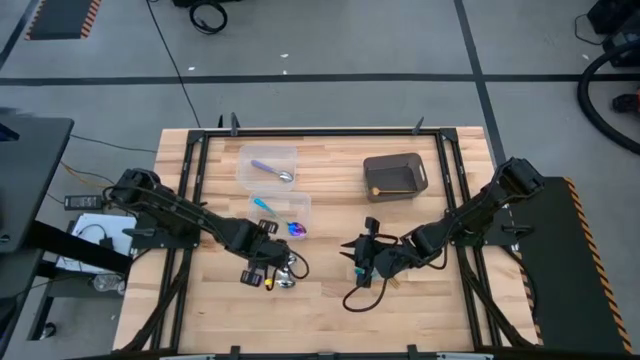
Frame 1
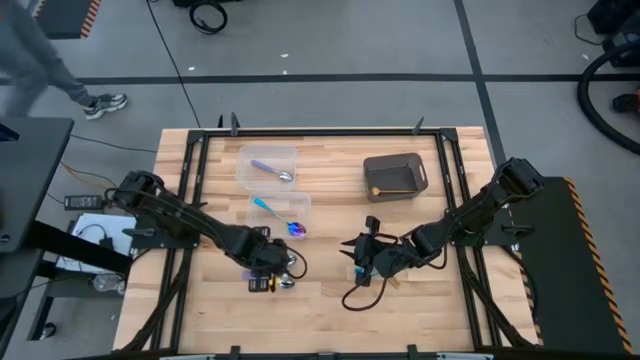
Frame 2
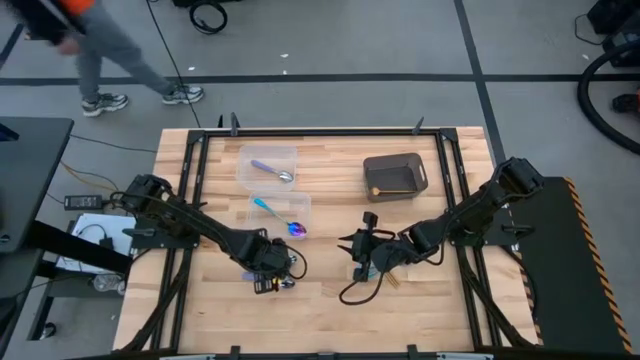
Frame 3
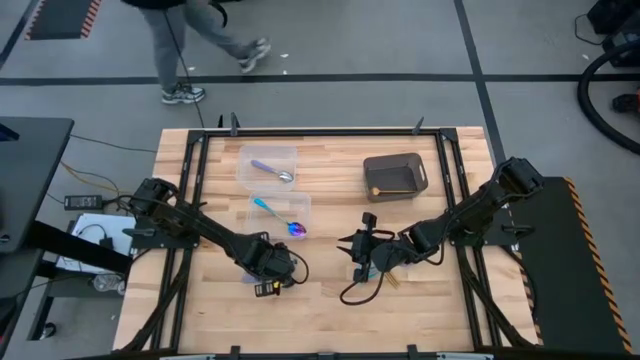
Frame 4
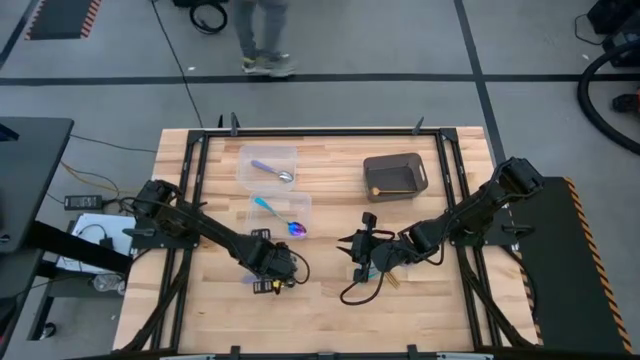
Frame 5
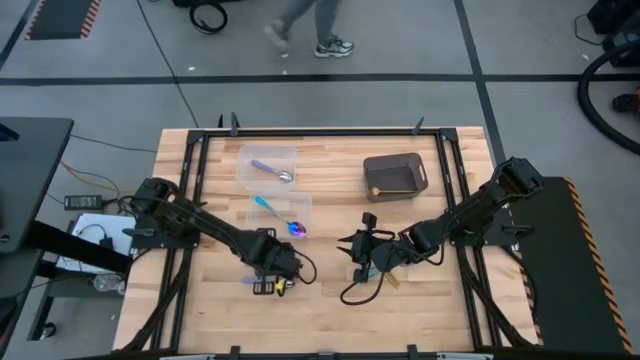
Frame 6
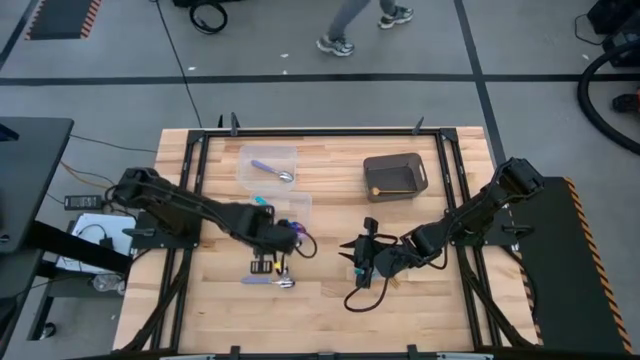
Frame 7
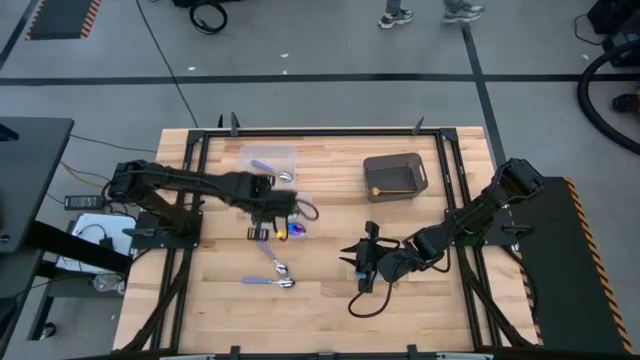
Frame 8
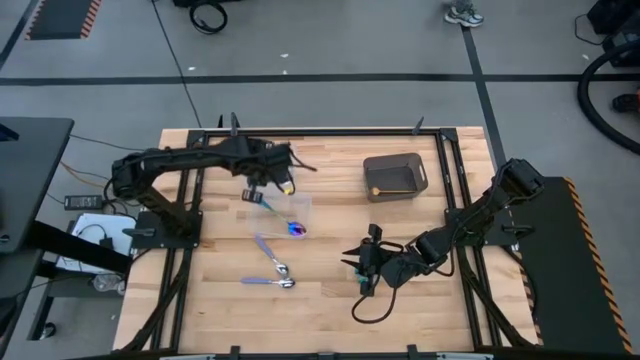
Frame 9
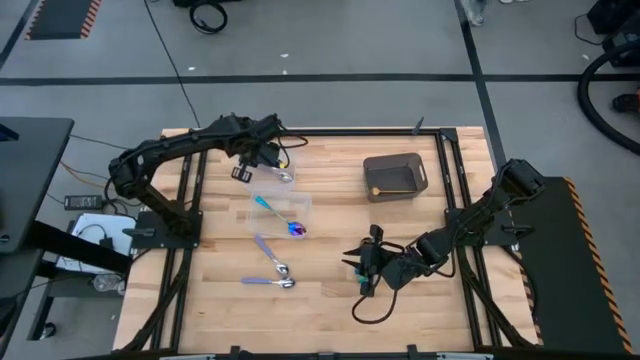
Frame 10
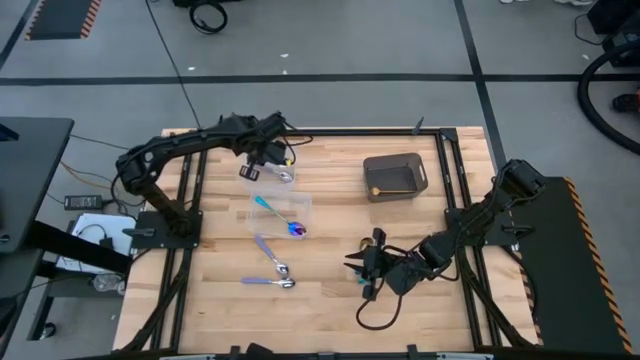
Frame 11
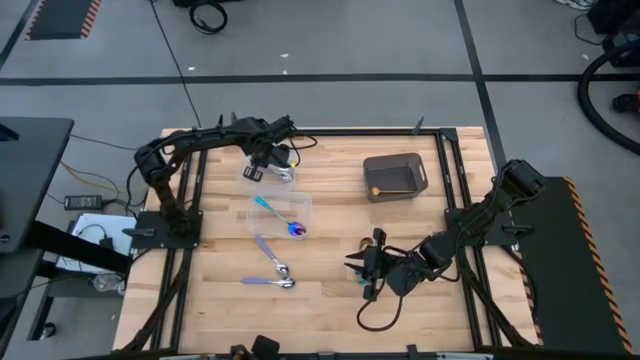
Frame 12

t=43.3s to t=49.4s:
Task: Sort silverware by color (type)
Put the purple spoon into the top transparent bin

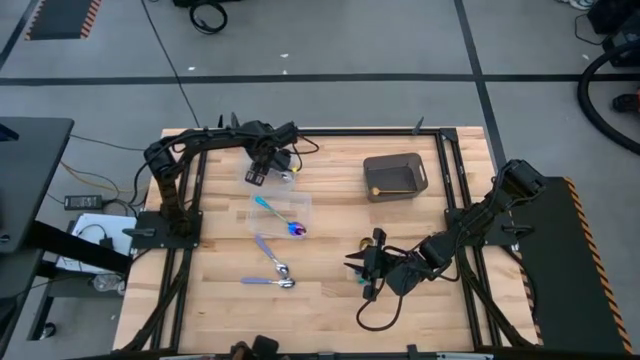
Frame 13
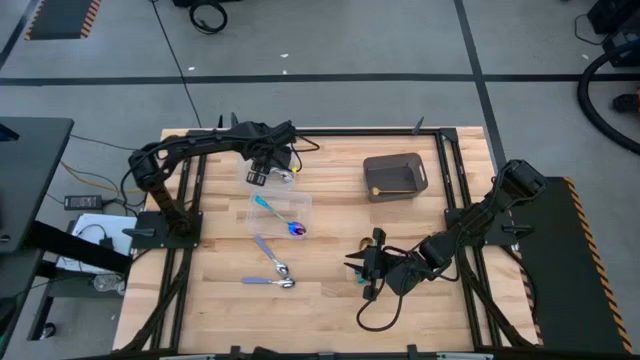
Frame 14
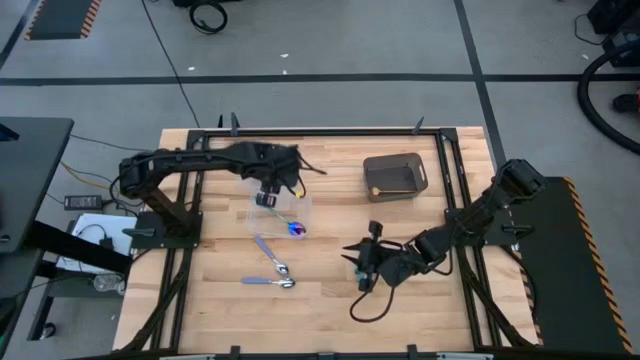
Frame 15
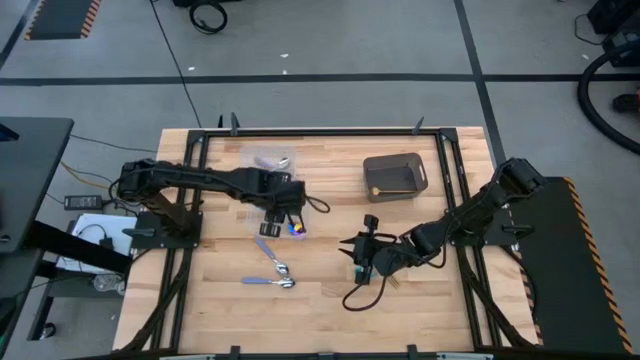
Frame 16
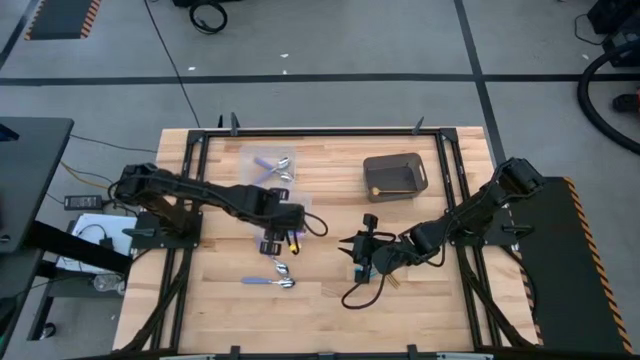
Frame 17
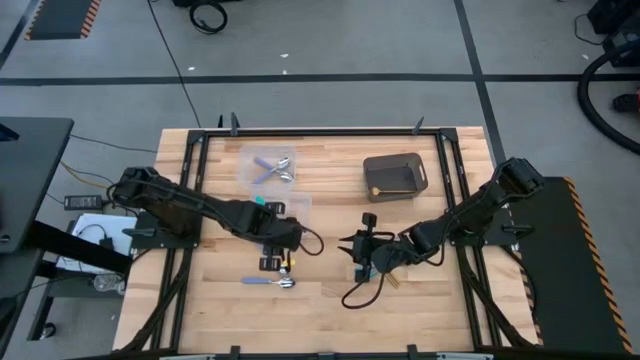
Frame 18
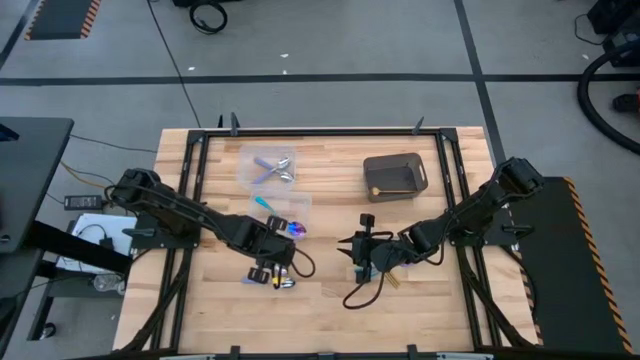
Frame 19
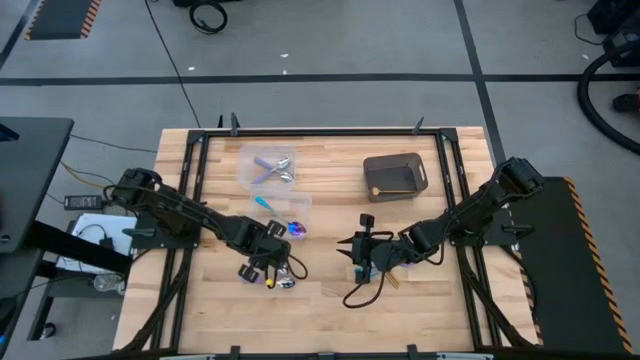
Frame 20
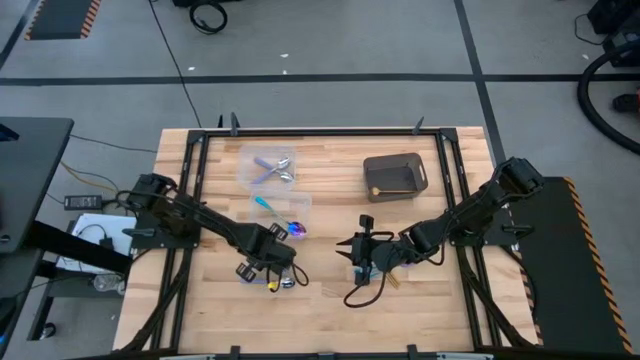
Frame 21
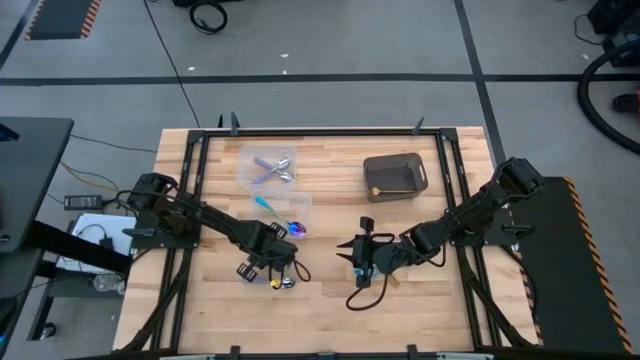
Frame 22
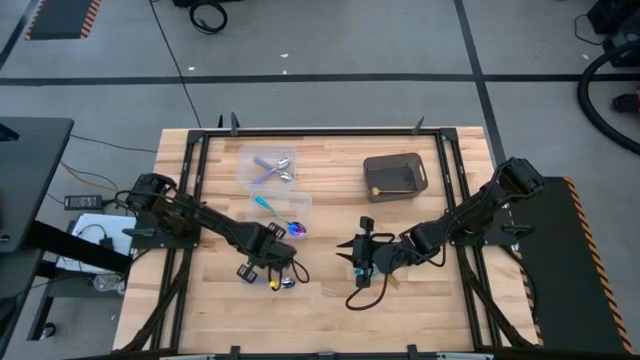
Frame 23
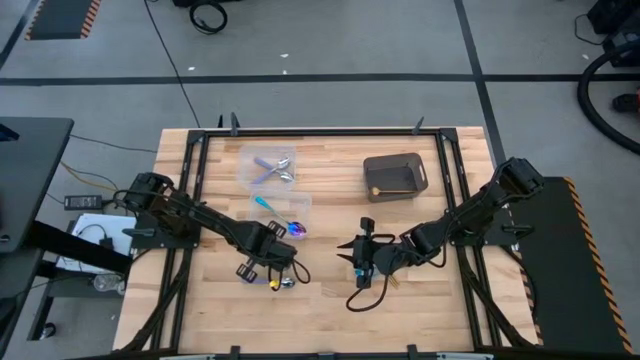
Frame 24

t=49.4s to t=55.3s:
Put the purple spoon into the top transparent bin

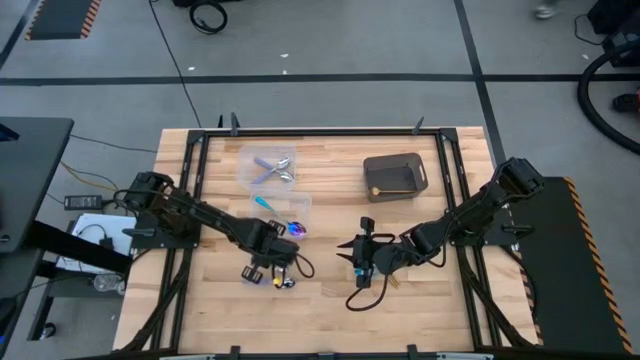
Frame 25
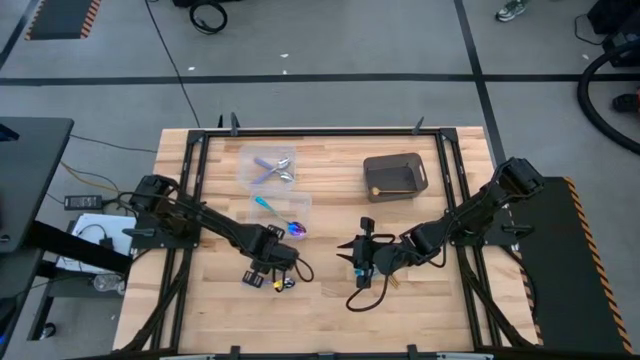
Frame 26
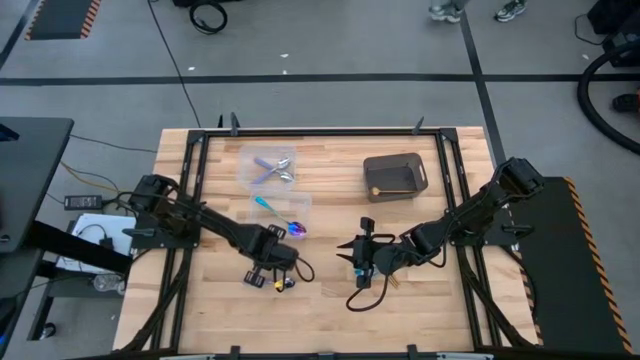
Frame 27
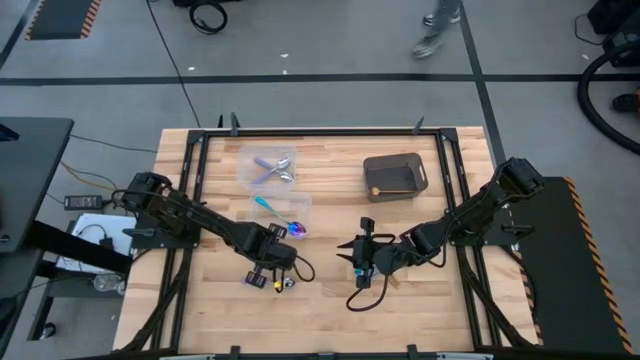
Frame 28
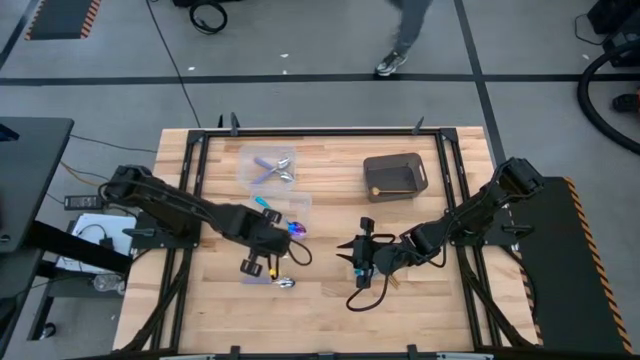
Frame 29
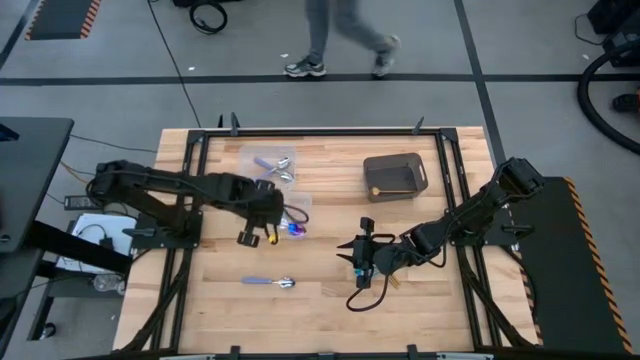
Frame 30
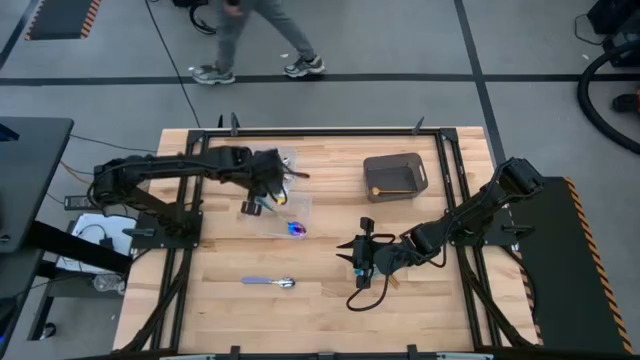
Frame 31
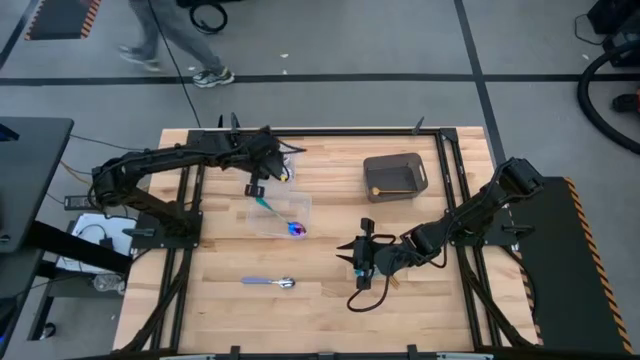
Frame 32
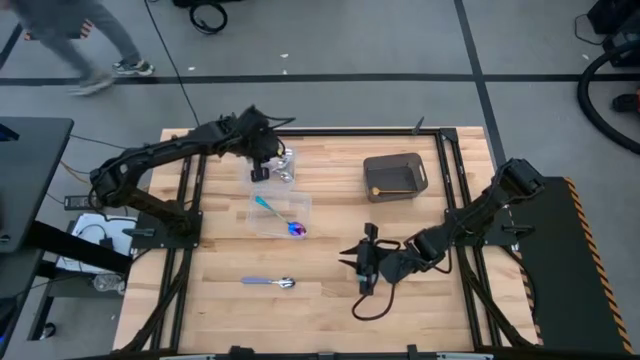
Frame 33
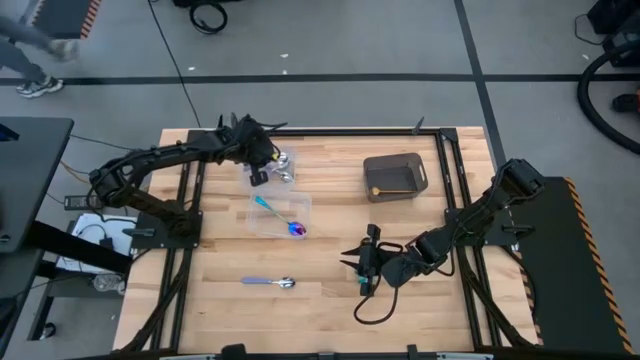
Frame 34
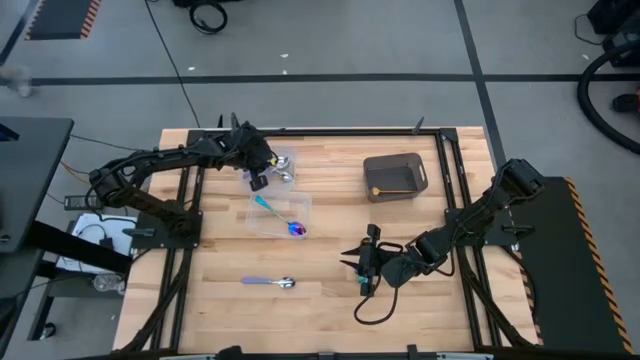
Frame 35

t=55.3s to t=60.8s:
Put the purple spoon into the top transparent bin

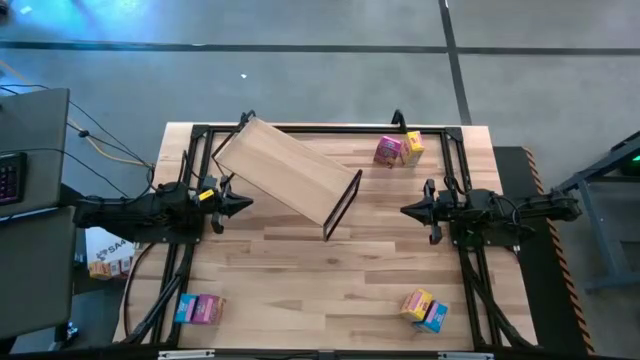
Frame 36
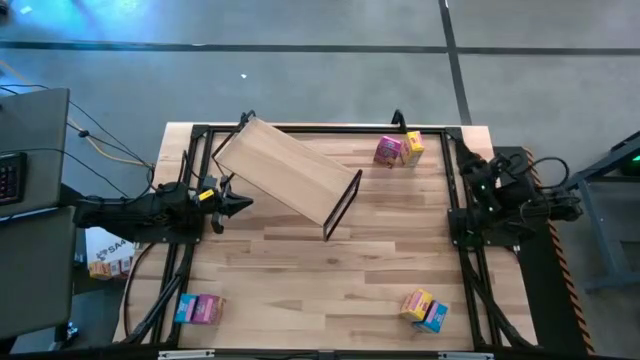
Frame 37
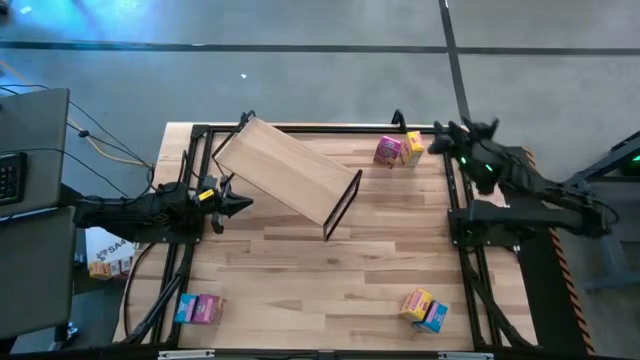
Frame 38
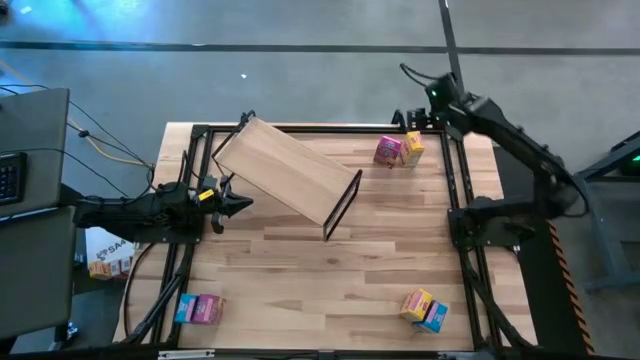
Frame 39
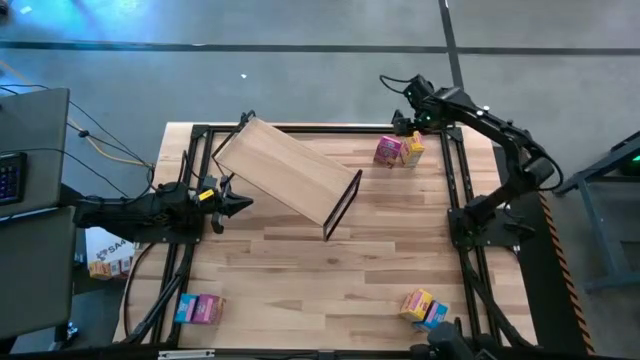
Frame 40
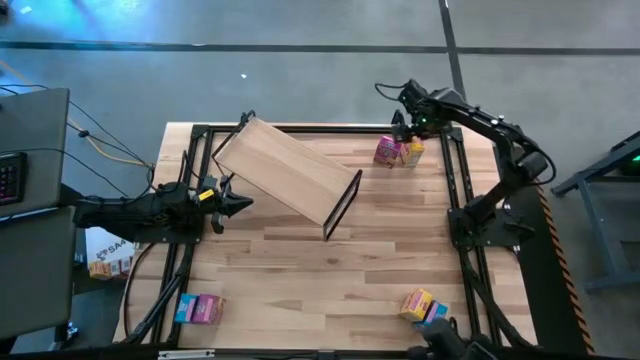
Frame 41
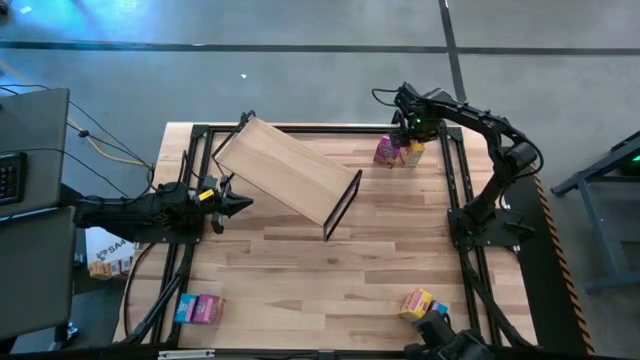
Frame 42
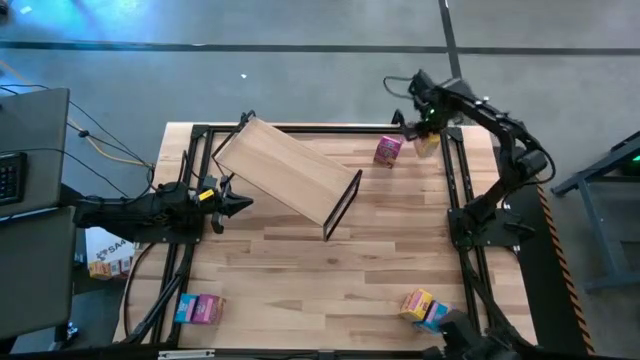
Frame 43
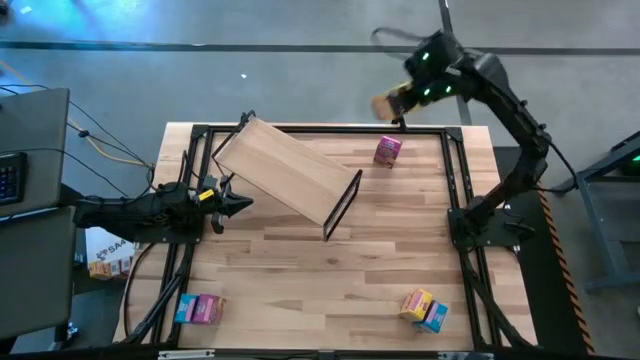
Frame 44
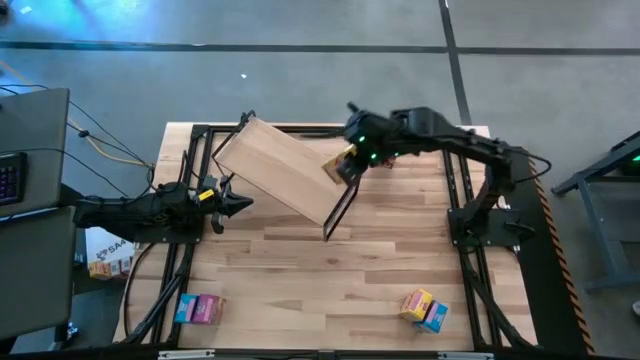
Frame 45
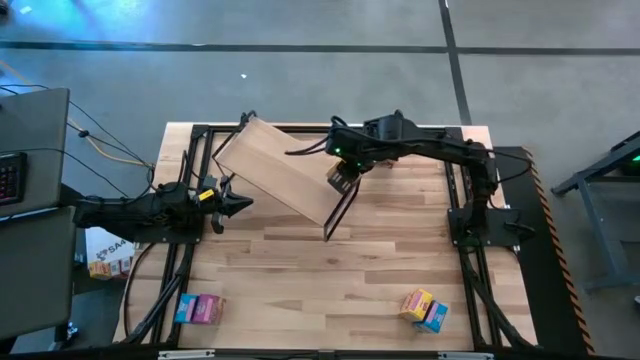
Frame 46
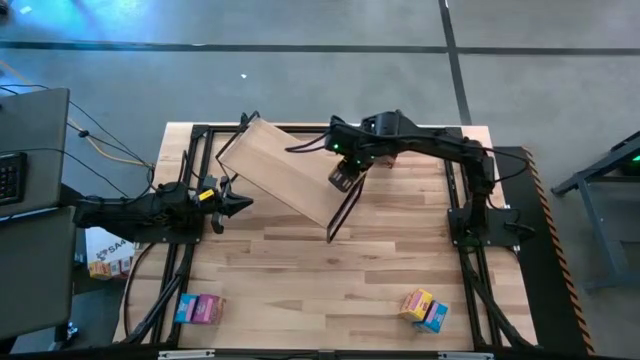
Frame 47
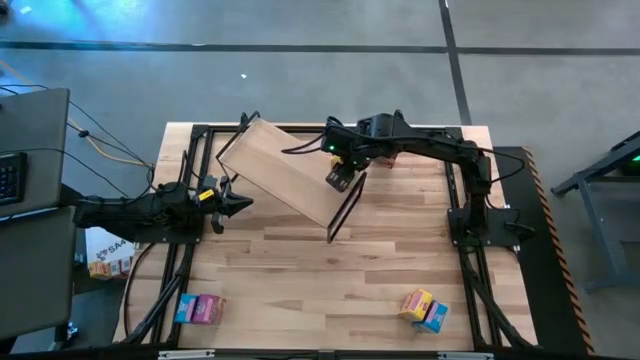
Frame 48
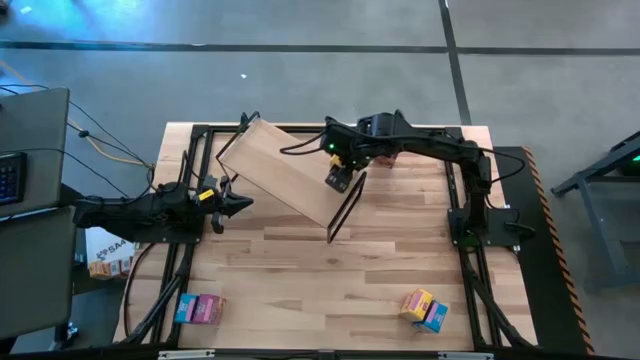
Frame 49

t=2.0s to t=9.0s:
Task: Stack cereal on shelf
Put the yellow cereal box on the shelf
